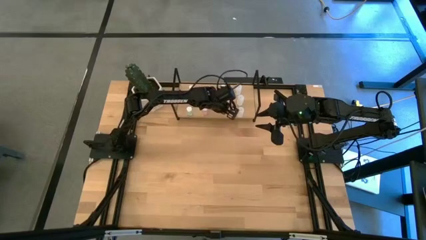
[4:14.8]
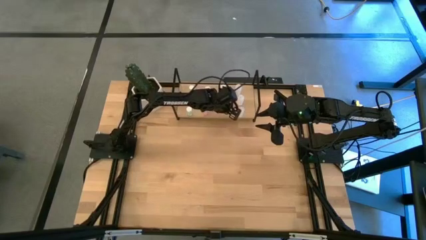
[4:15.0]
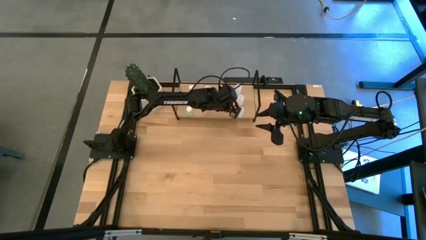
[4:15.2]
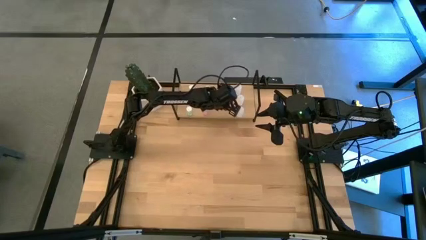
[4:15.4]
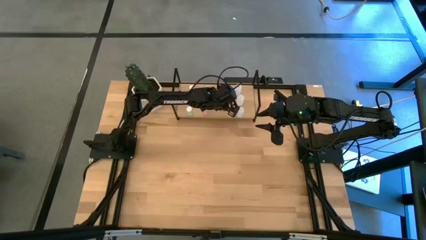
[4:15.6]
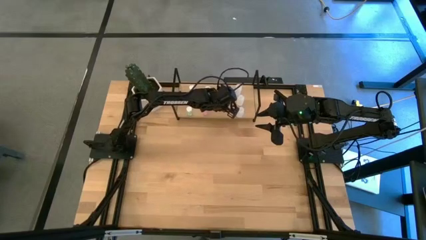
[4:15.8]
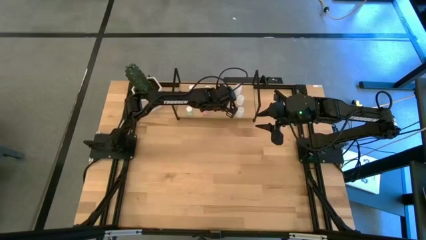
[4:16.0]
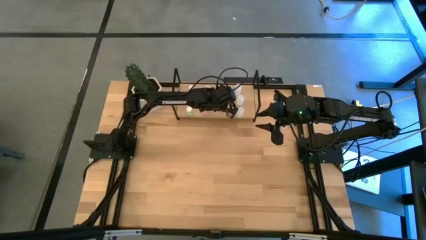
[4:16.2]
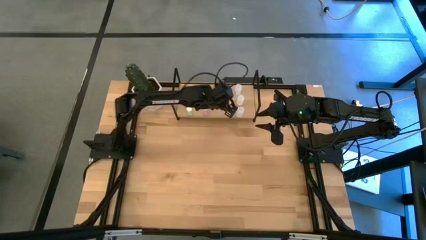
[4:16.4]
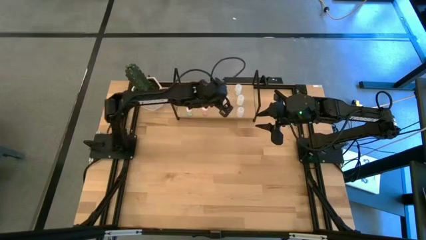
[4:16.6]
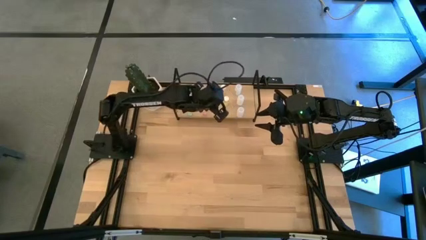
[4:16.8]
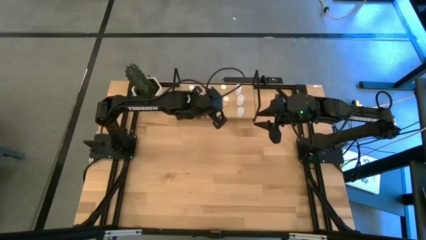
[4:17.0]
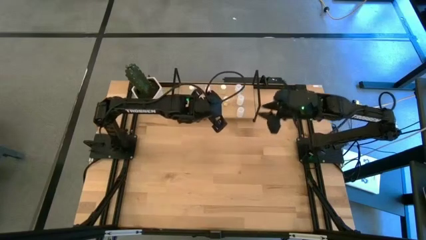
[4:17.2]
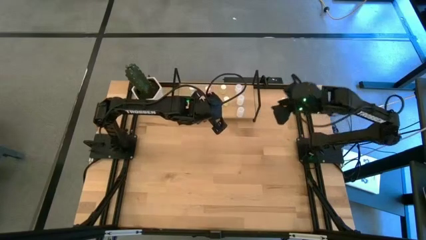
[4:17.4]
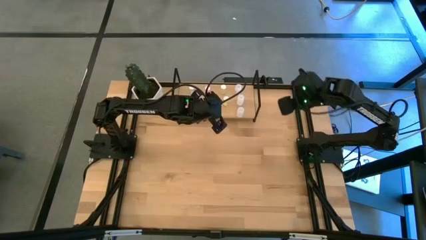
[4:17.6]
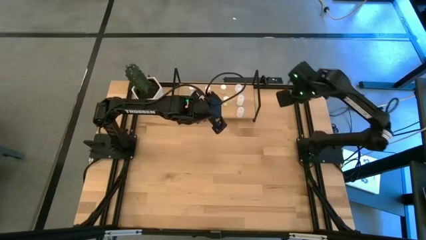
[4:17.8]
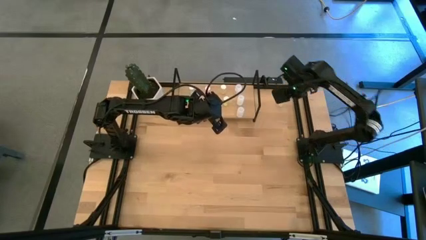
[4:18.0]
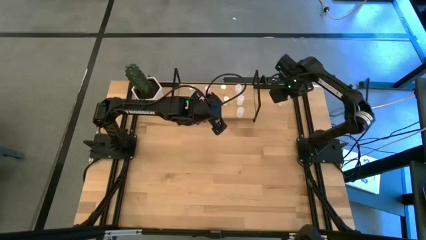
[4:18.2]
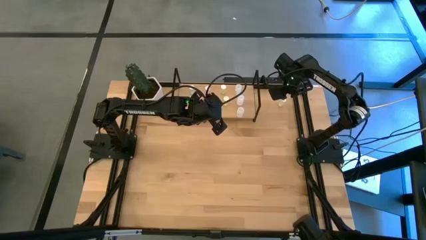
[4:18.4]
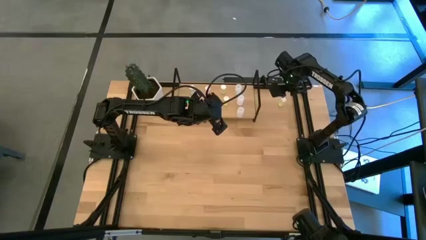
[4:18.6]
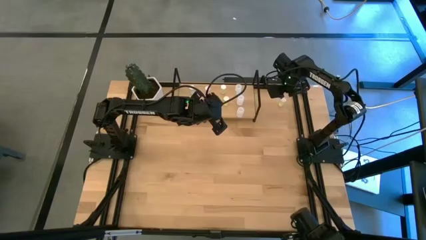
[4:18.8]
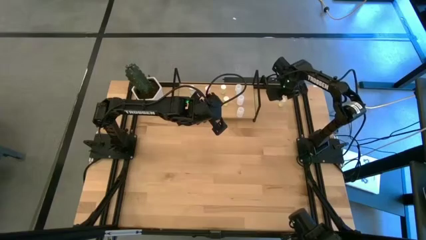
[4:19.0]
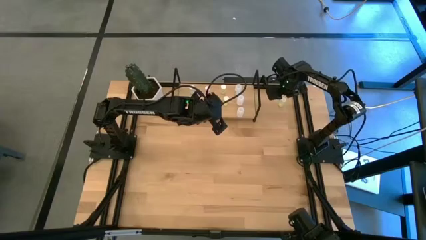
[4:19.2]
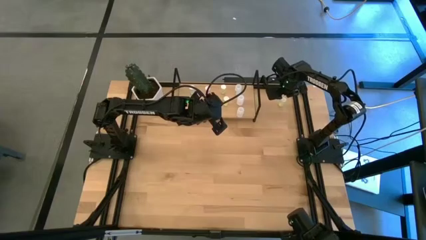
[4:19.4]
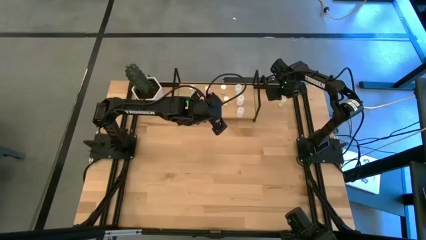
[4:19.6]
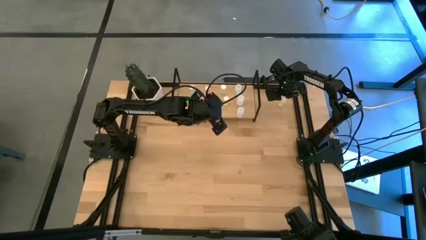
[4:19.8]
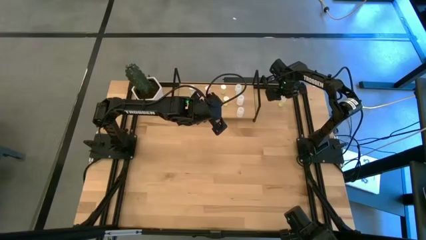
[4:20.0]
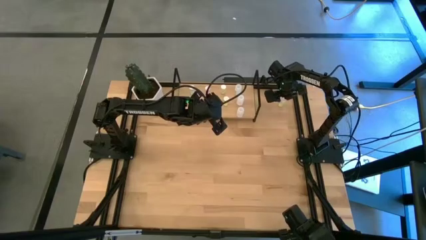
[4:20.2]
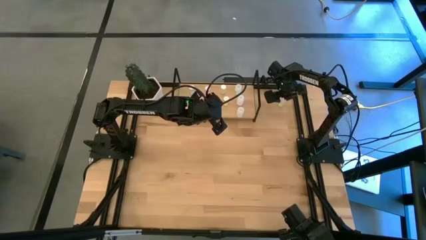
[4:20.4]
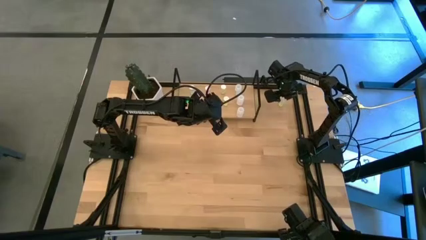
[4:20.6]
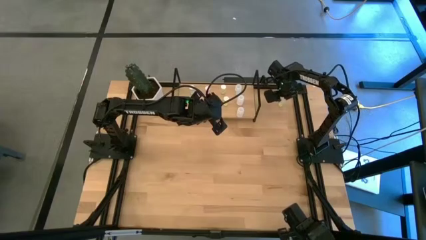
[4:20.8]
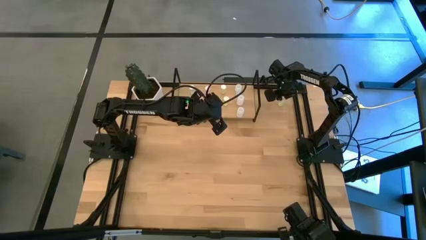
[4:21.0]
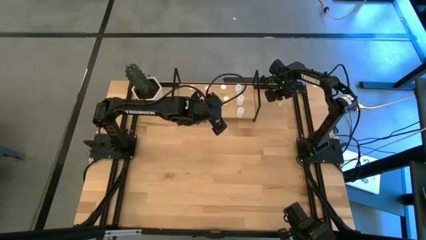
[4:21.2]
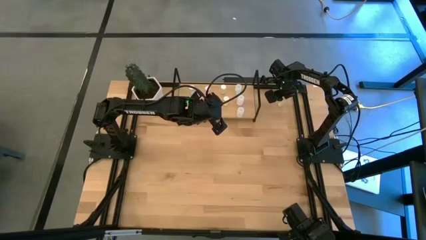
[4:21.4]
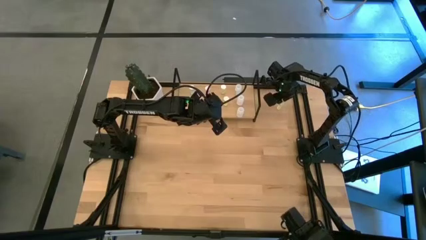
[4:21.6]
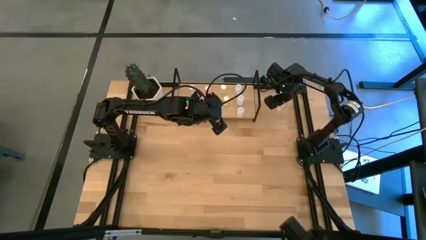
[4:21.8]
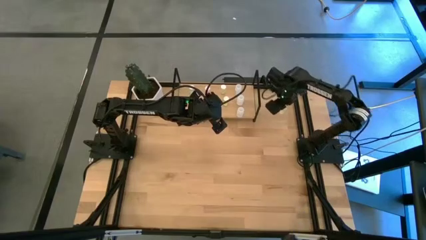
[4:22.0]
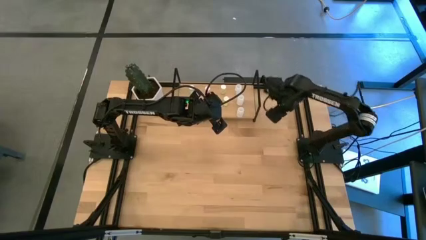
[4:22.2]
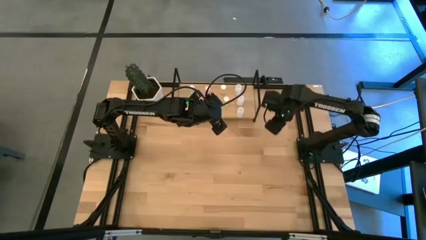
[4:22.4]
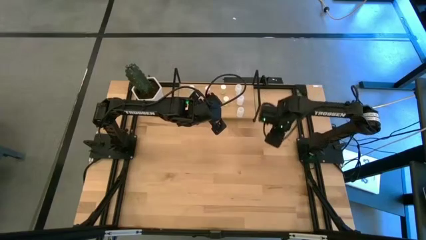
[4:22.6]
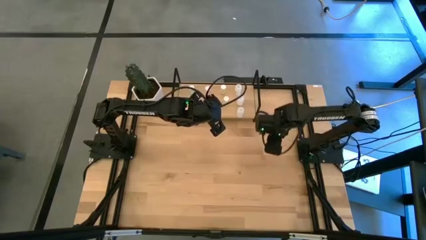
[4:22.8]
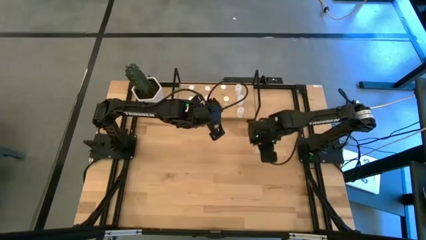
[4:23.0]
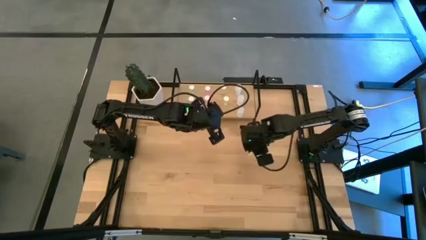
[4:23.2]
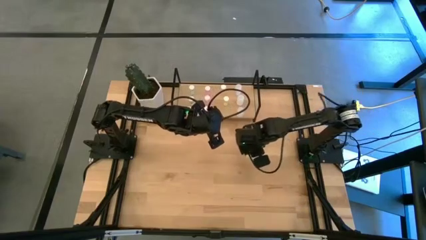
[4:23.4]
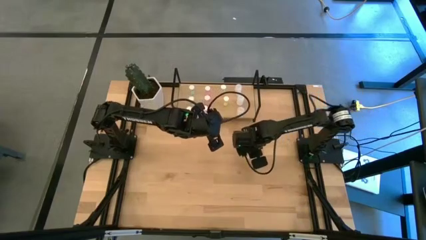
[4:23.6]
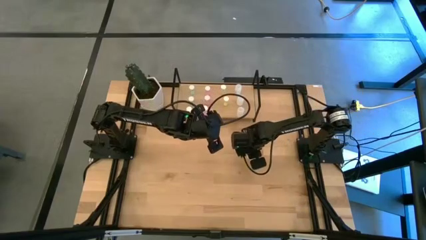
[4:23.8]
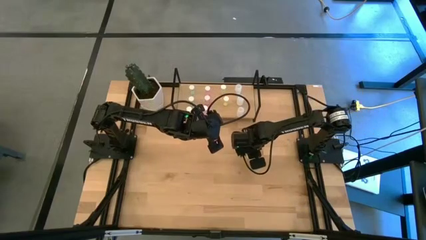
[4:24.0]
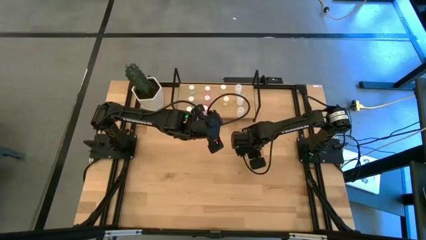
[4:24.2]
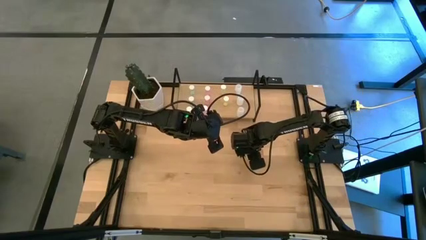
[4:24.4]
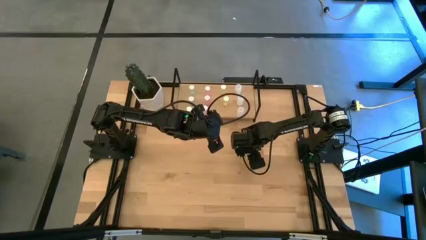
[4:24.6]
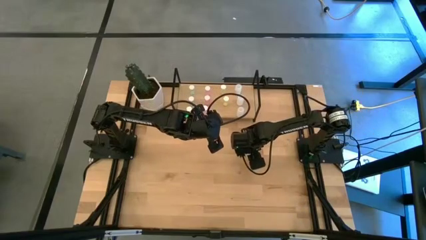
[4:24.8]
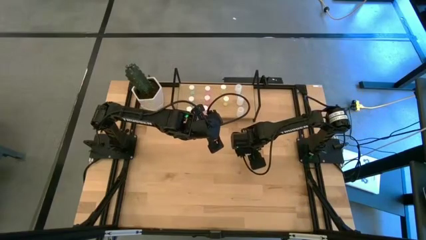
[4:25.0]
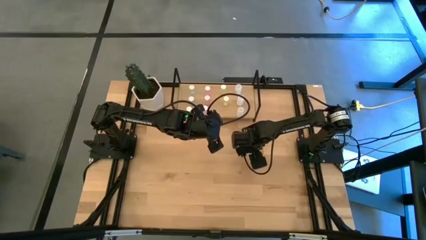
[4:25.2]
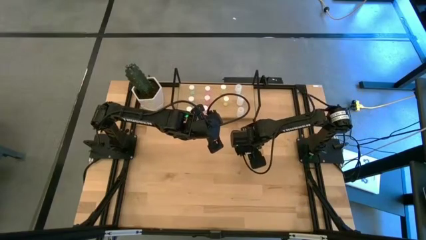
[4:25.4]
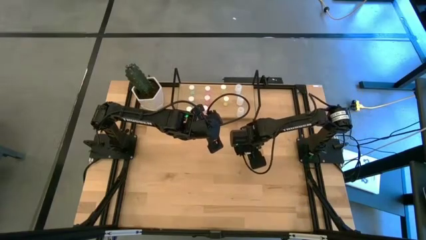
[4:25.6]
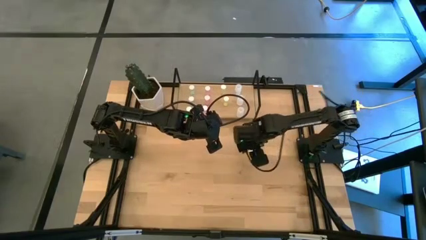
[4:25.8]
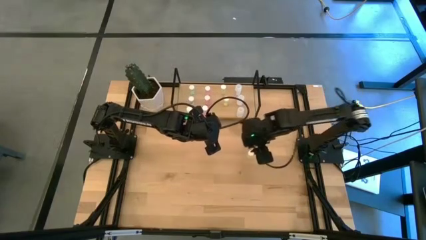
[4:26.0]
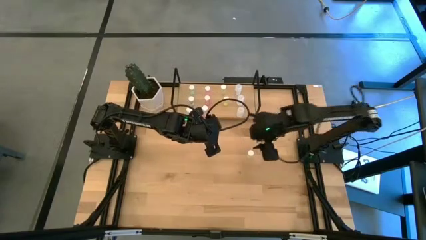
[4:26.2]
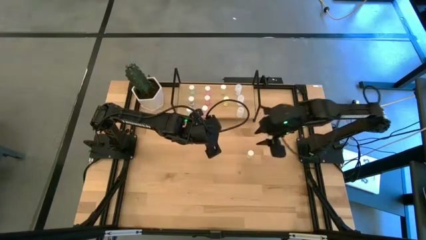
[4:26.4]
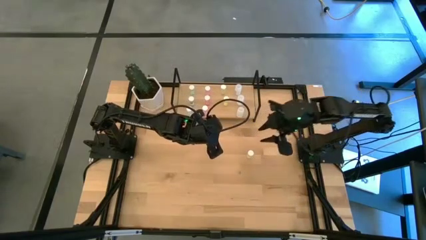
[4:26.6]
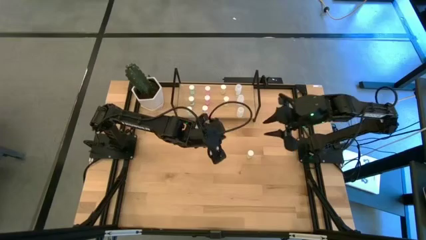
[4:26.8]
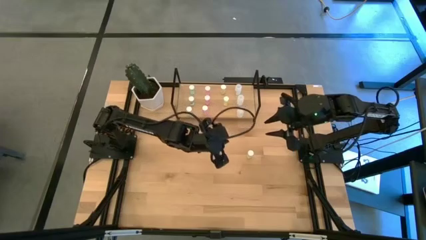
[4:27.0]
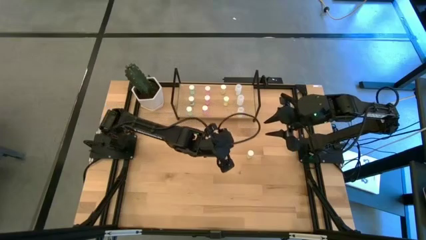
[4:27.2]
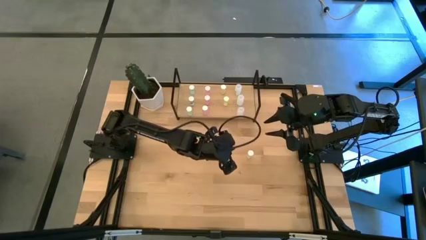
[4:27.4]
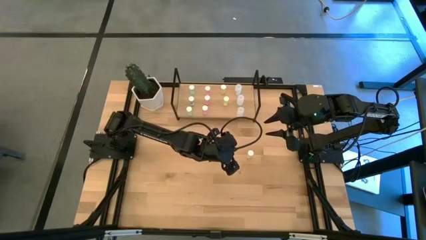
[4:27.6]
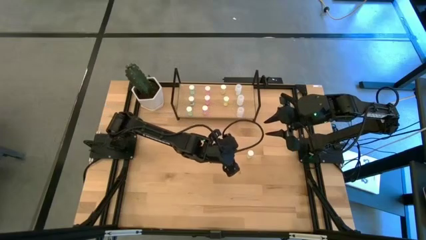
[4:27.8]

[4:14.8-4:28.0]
Task: Pick and place medicine bottles onto shelf by color
Put the yellow pill bottle on the shelf aligned with the other yellow pill bottle

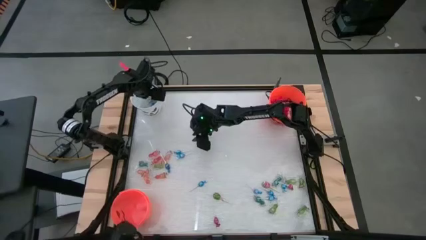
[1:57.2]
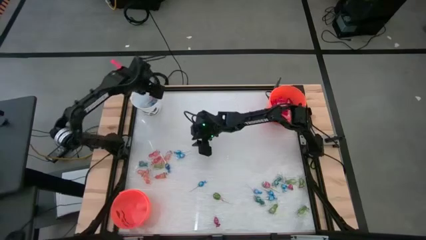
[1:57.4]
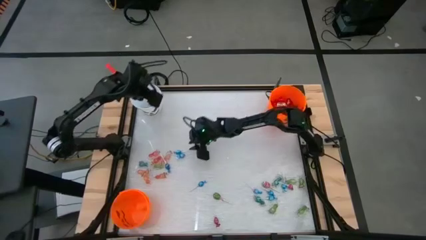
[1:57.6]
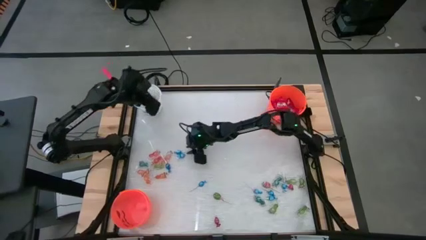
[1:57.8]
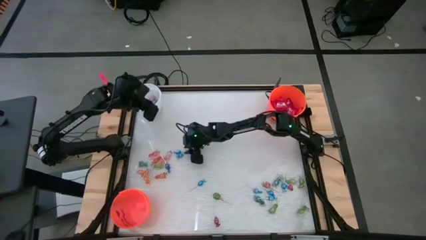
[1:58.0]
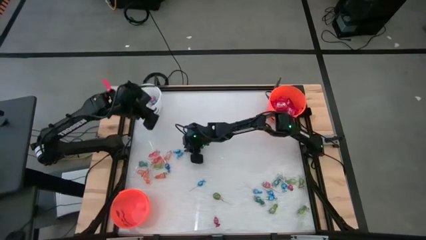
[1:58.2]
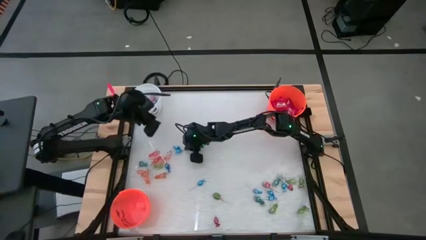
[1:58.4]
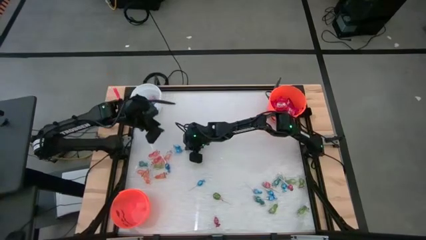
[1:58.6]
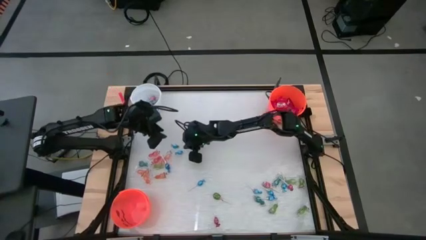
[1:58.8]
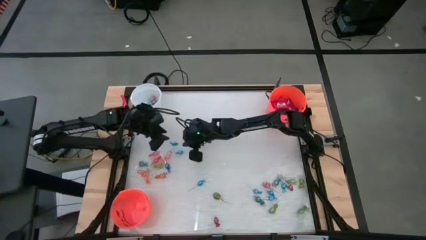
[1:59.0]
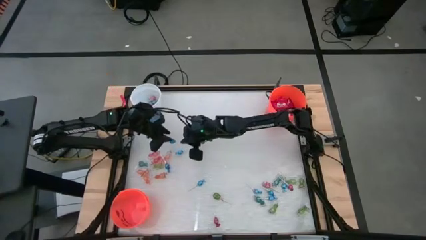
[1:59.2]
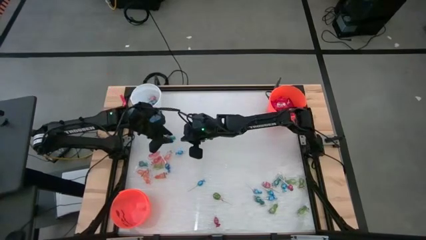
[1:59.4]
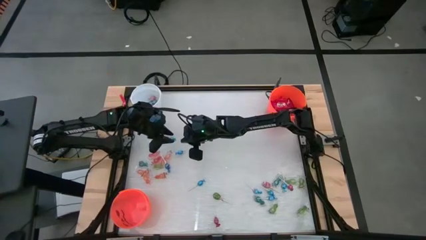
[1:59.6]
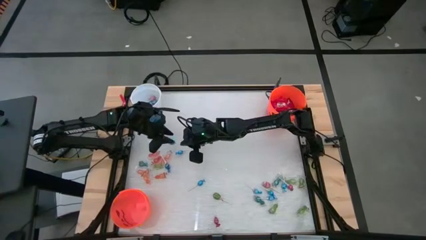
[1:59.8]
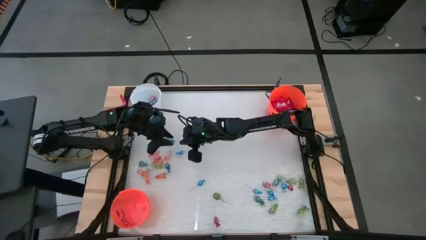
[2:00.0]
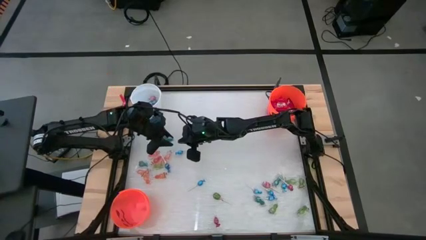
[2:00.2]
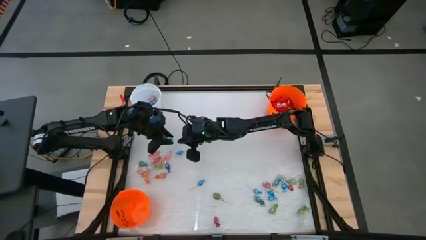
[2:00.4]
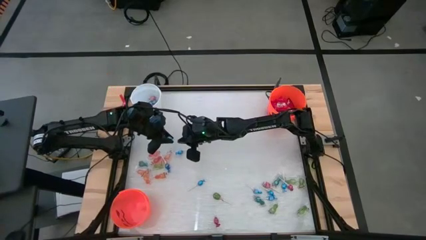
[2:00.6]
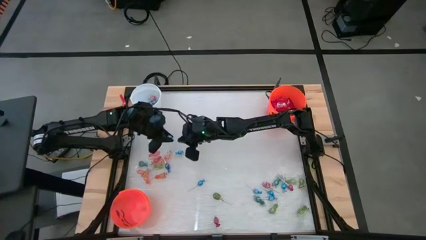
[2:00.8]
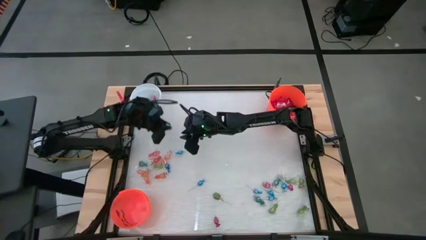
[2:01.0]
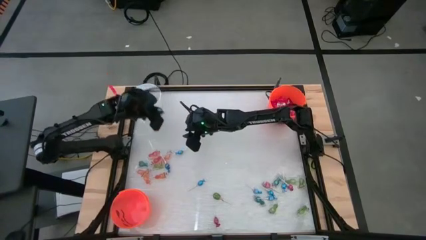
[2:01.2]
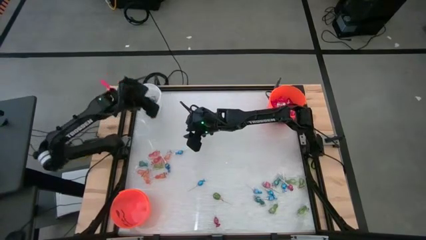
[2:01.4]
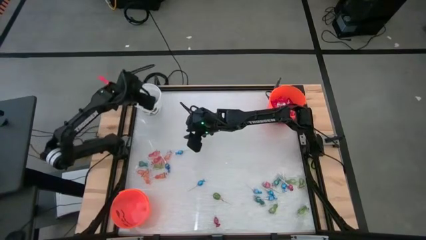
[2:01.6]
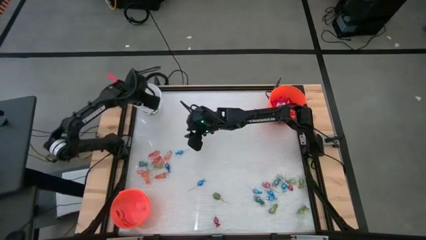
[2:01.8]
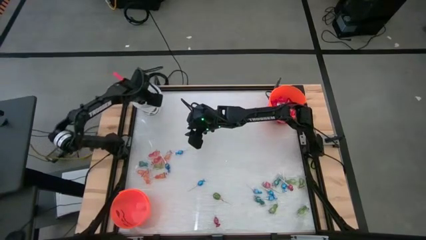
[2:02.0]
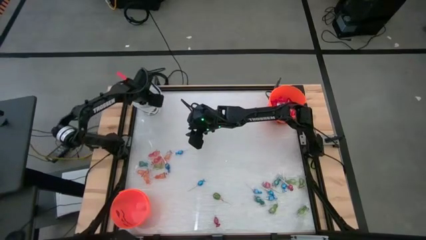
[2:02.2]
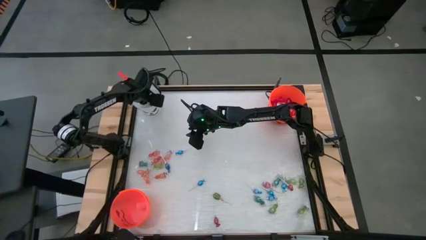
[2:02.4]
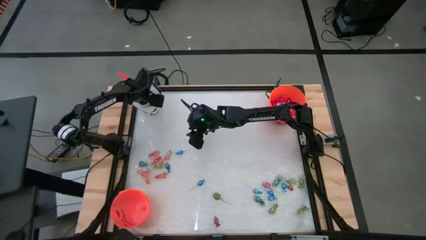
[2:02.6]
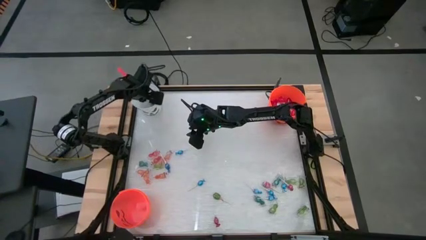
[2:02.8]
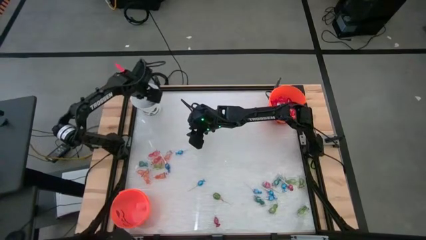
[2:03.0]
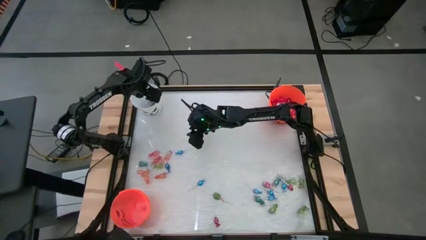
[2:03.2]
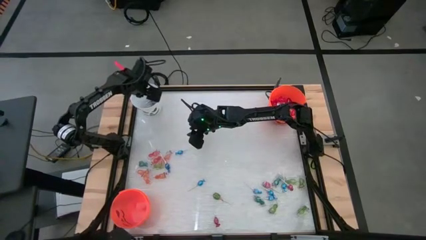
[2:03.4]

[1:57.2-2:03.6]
Task: Sort candy by brand, put in halloween buckets
Put the blue lollipop into the white bucket
